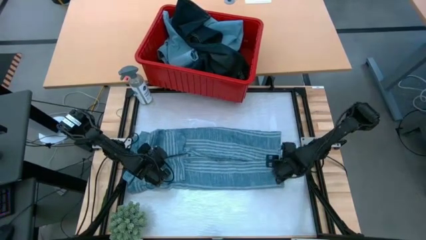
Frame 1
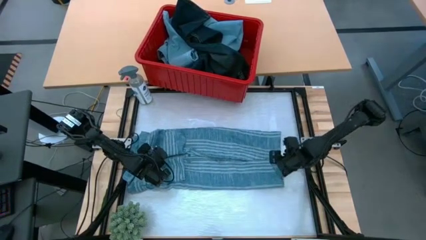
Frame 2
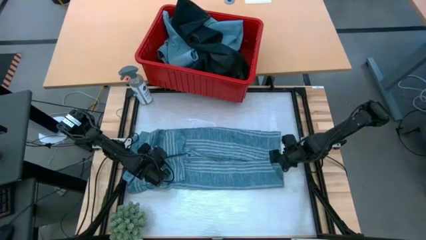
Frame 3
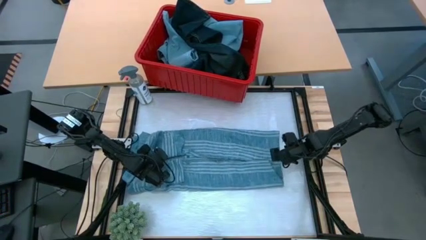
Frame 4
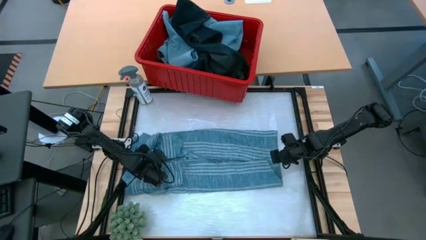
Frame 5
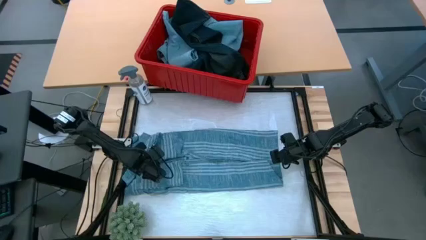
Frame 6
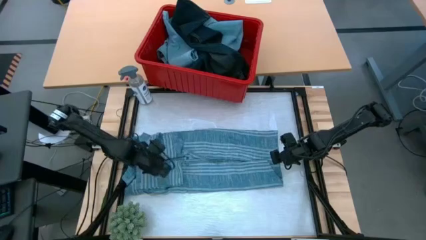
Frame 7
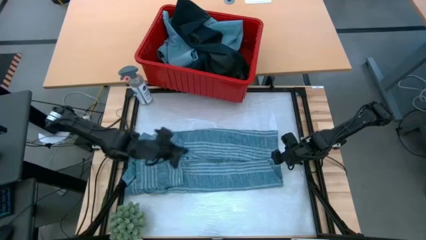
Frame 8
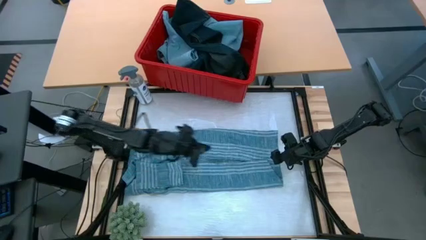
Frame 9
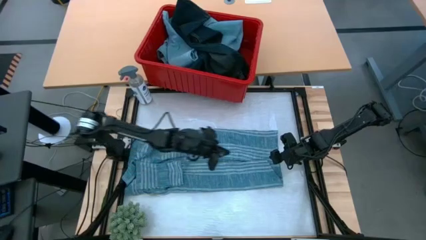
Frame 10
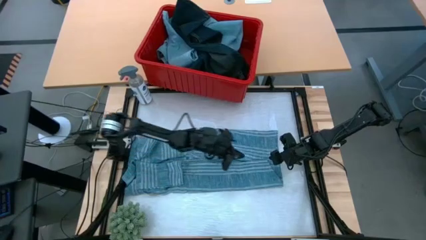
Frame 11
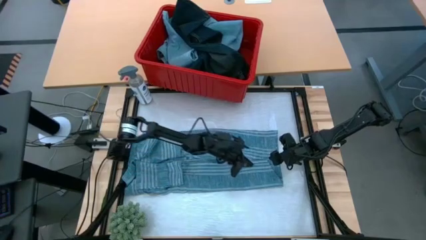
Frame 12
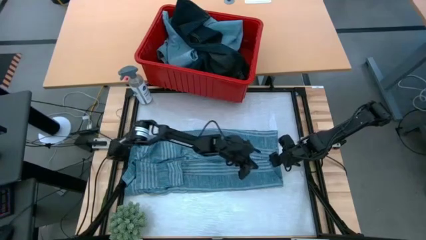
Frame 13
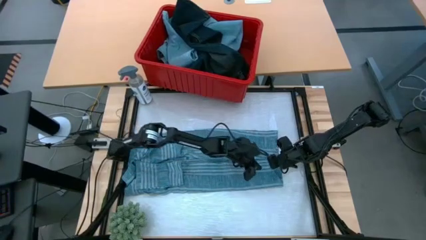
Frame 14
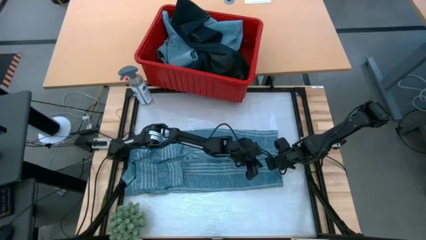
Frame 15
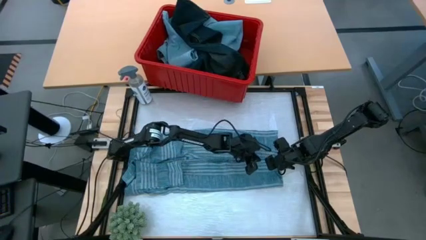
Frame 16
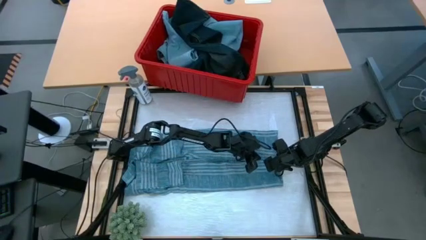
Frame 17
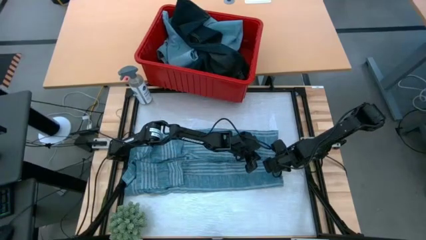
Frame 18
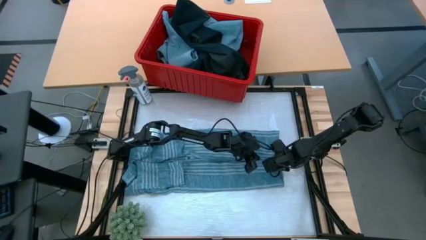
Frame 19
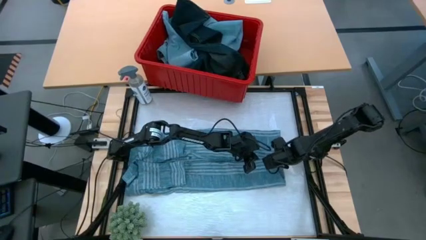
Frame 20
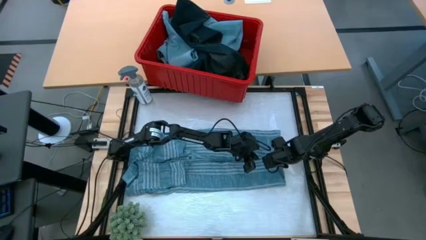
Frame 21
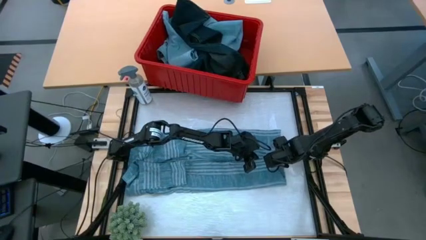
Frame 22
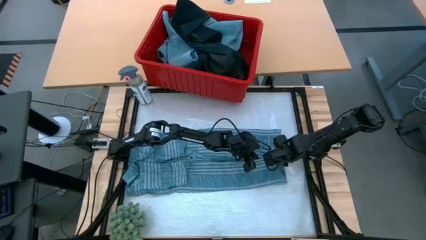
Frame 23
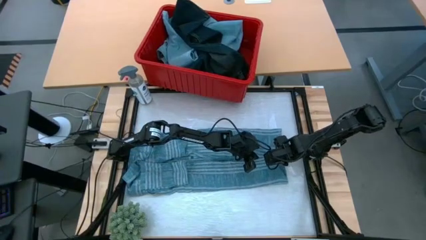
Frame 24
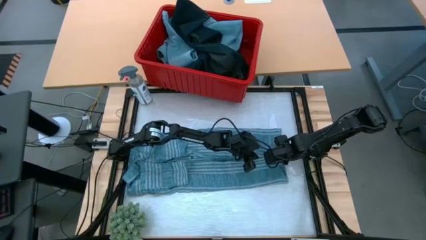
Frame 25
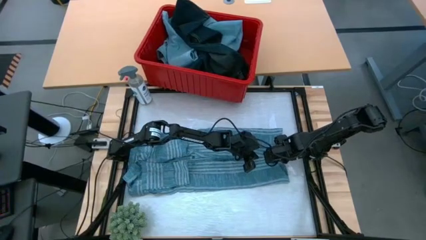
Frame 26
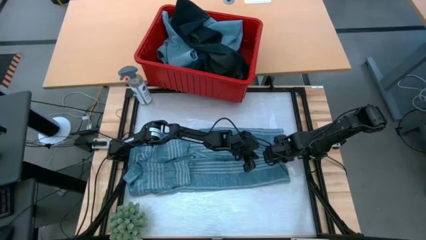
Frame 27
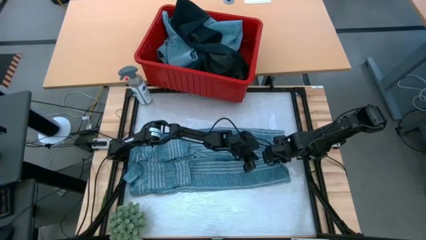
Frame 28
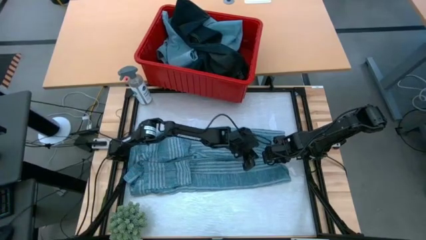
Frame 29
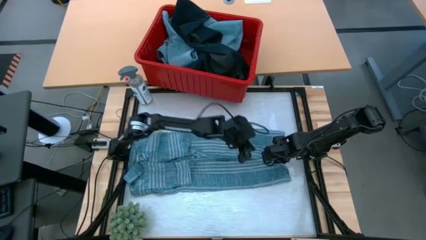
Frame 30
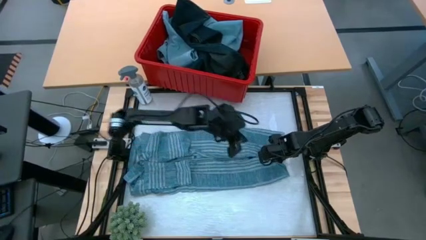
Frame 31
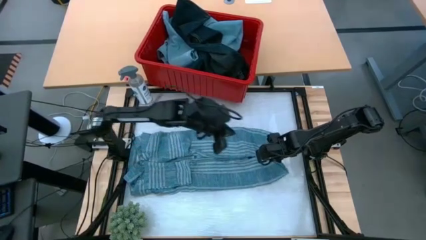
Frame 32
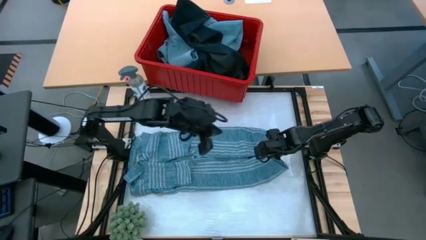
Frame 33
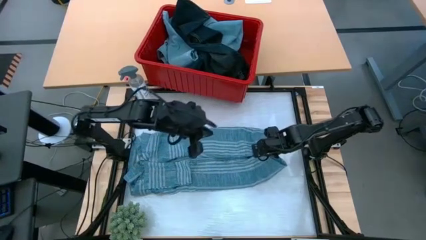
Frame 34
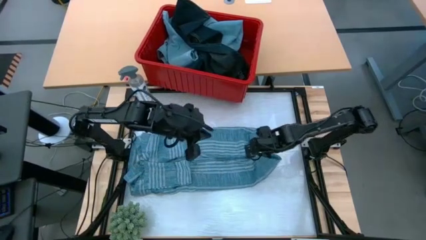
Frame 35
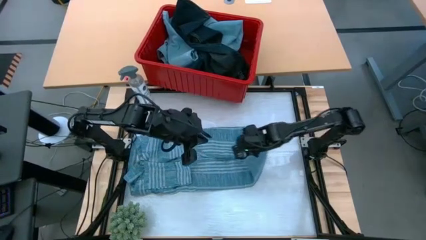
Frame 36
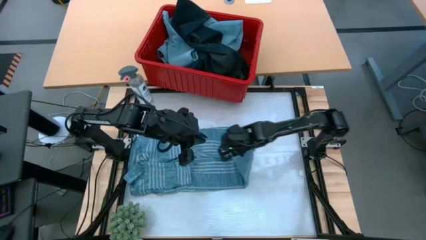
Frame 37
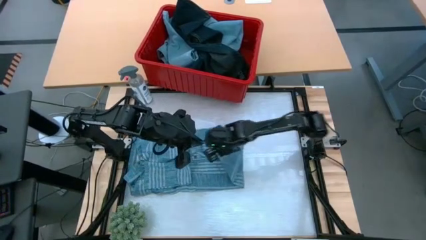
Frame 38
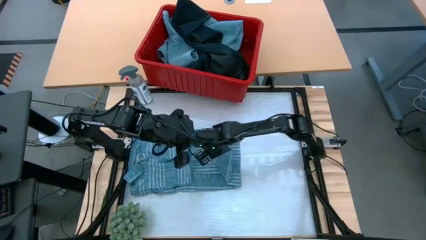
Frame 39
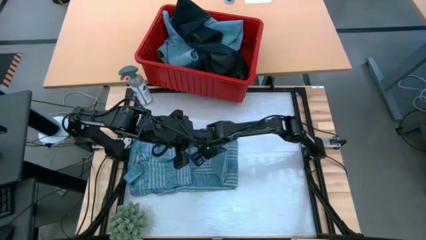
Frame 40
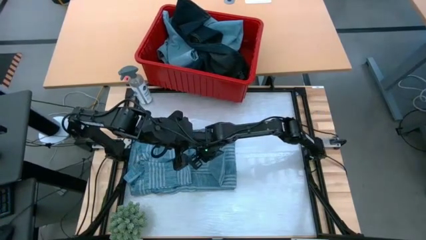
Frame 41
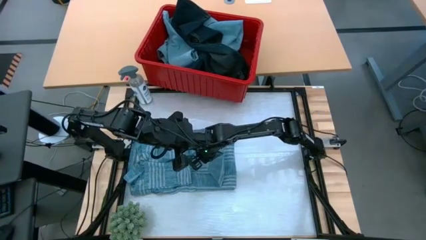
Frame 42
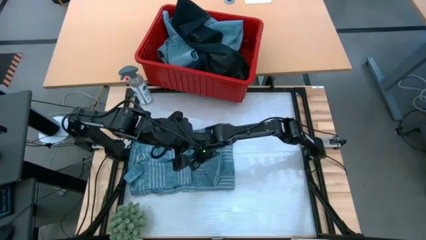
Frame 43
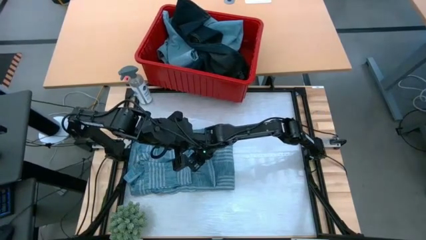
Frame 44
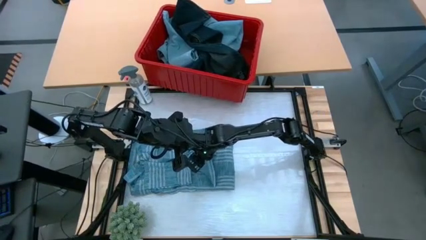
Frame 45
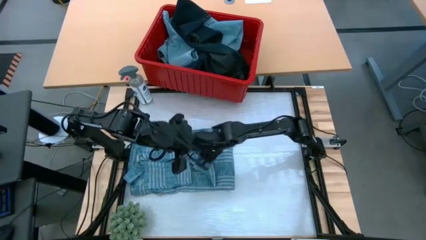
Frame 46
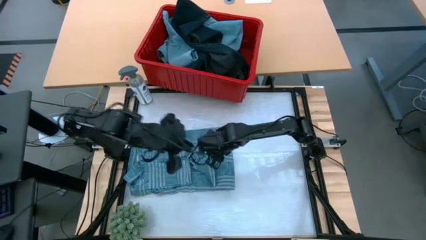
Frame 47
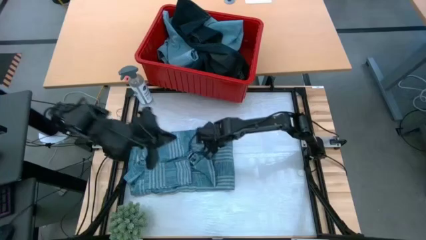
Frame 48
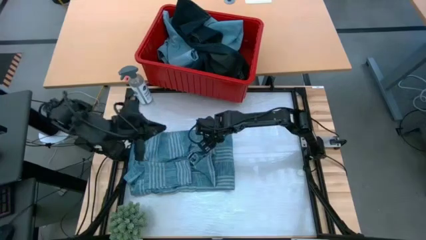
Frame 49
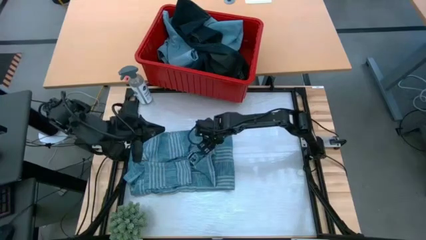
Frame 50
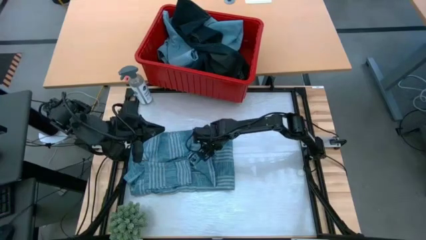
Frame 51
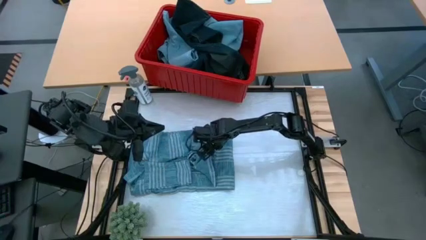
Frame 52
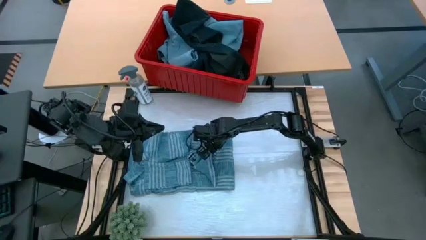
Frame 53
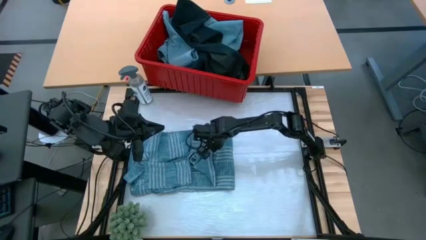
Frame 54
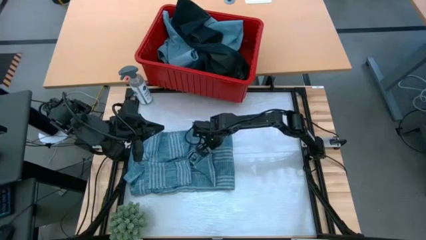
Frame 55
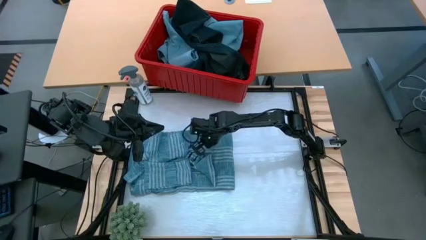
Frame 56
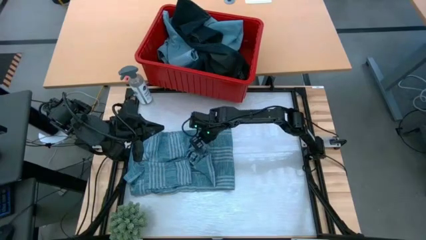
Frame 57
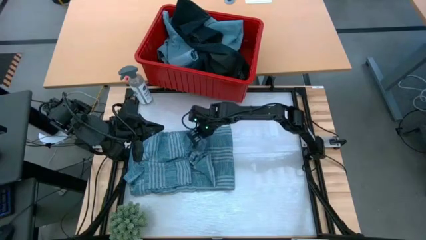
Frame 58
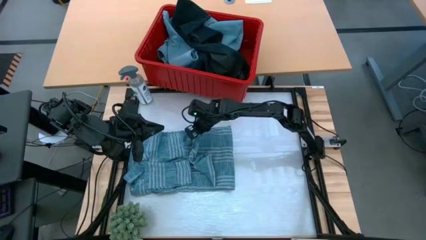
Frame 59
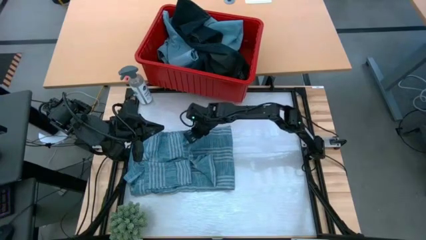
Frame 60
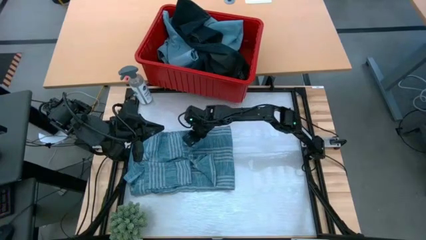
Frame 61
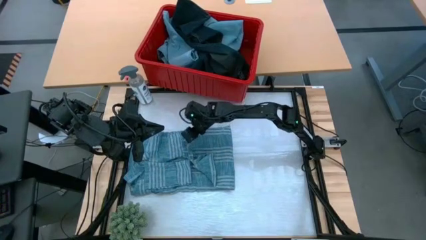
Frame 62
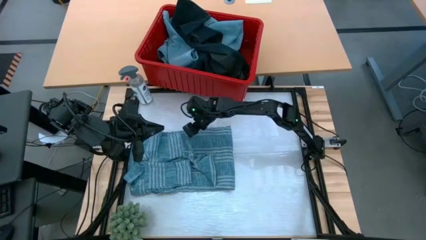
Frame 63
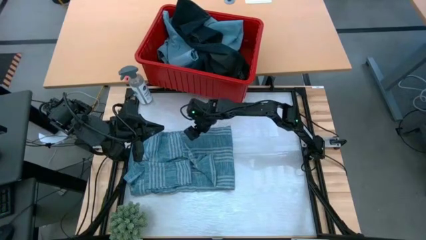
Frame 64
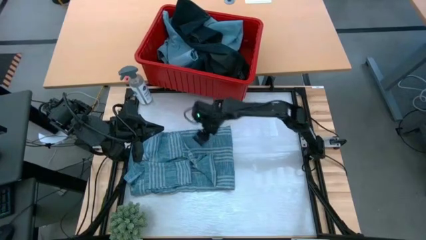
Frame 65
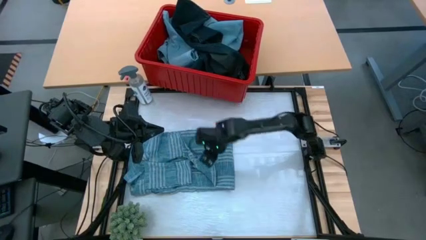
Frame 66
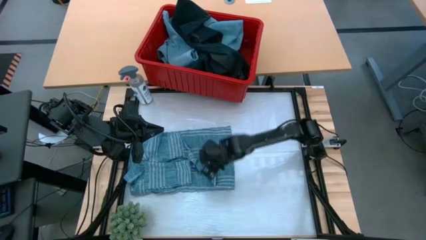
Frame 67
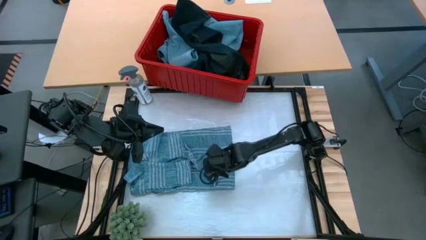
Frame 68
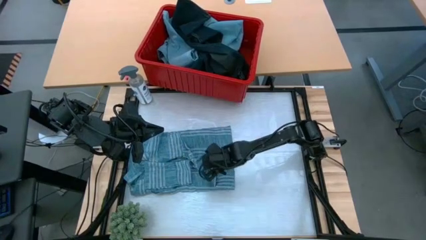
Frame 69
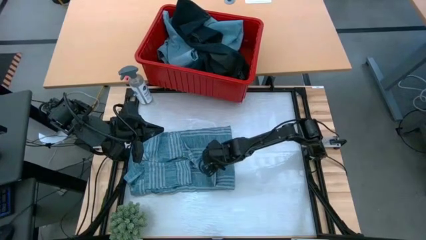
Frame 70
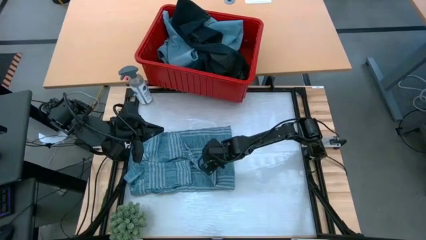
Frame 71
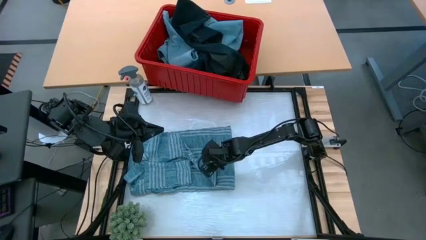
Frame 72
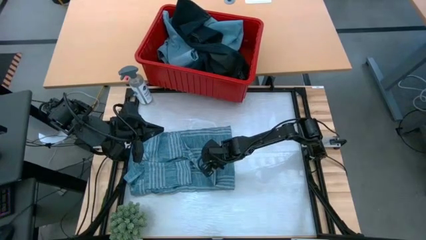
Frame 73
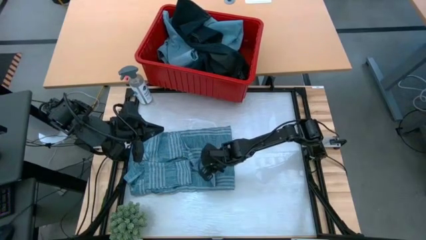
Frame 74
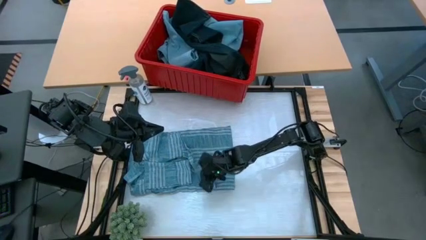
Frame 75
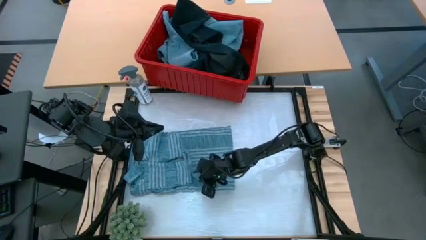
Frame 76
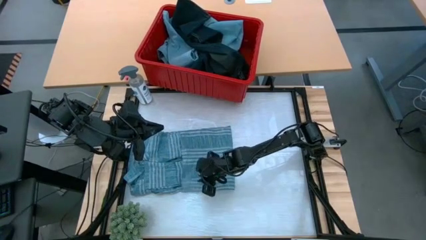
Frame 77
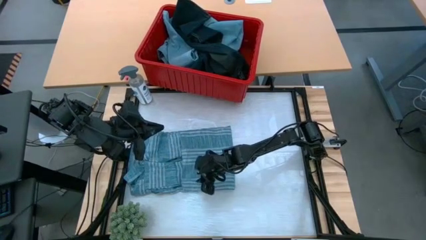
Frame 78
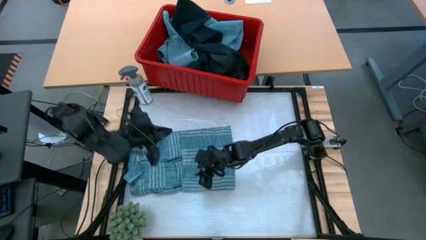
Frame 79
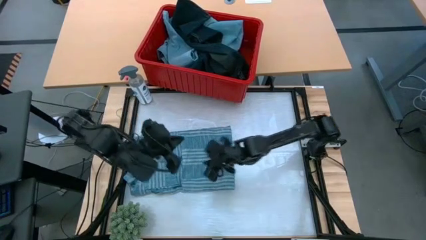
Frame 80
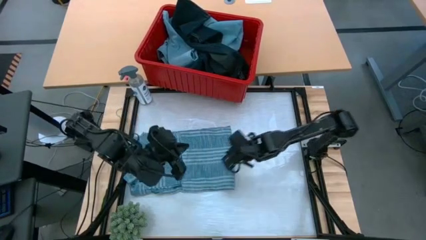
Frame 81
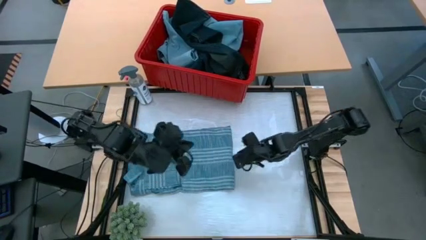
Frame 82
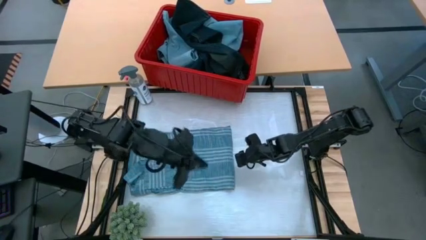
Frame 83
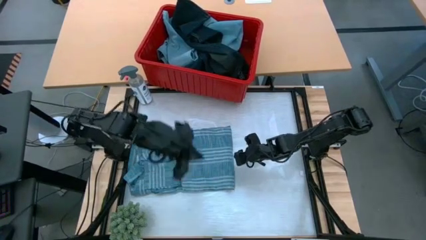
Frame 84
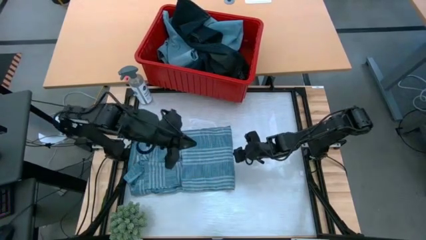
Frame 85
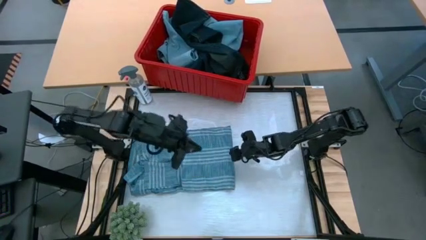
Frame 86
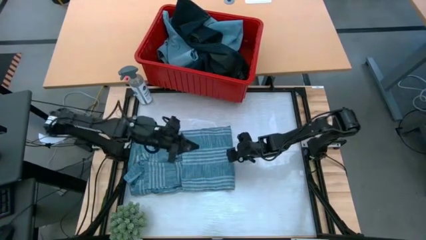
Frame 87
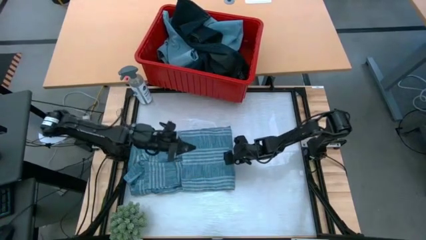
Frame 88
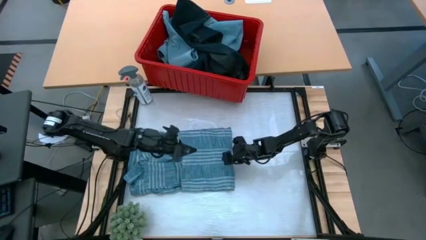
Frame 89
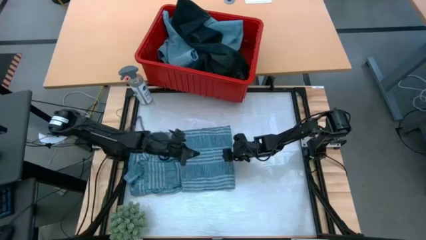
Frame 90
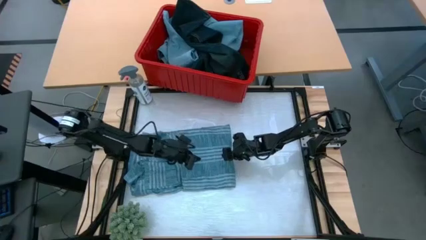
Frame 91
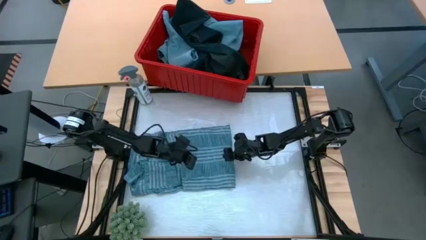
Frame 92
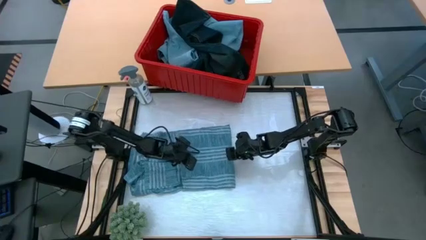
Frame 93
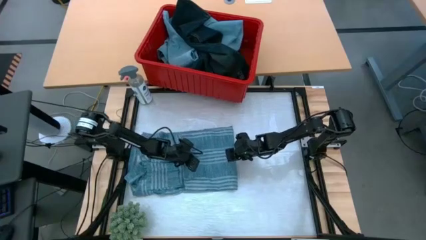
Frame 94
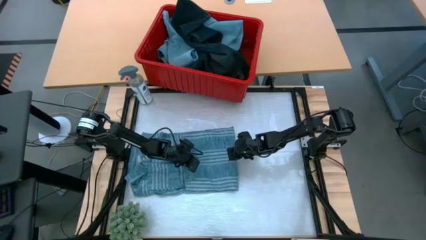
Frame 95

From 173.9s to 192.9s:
Task: Fold Laundry from Bin
Fold the light blue shirt
